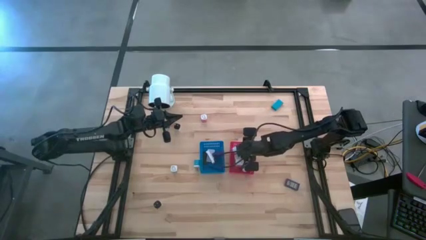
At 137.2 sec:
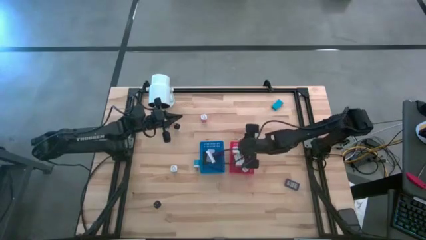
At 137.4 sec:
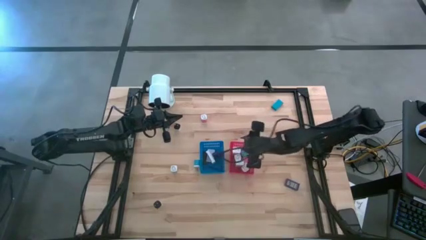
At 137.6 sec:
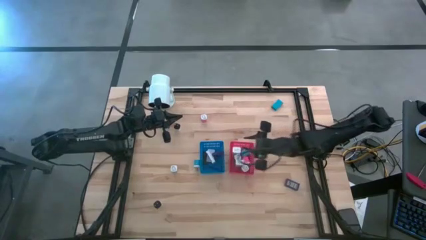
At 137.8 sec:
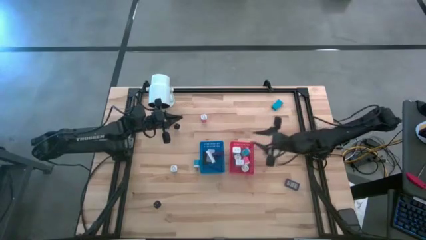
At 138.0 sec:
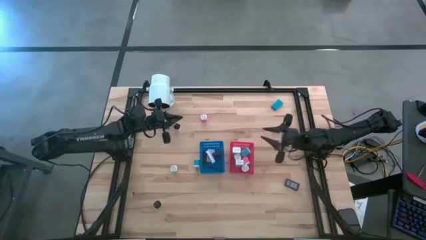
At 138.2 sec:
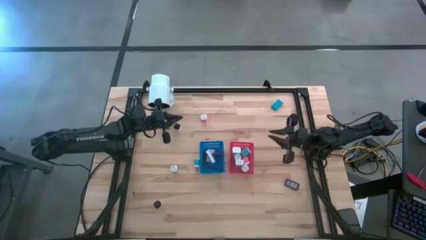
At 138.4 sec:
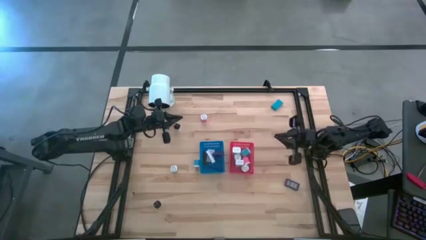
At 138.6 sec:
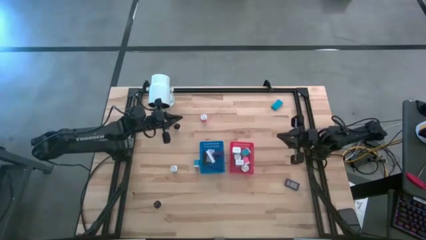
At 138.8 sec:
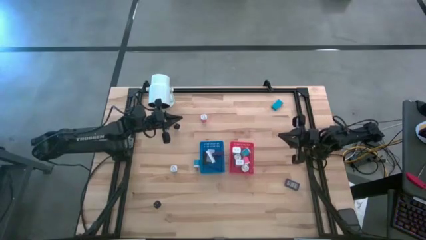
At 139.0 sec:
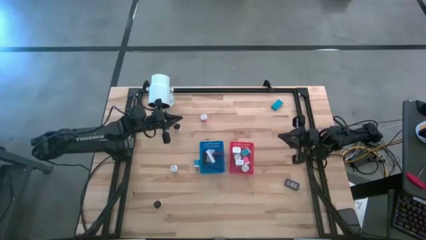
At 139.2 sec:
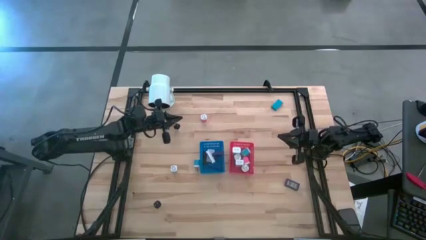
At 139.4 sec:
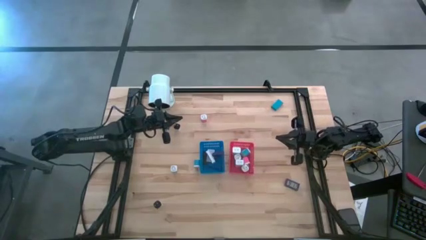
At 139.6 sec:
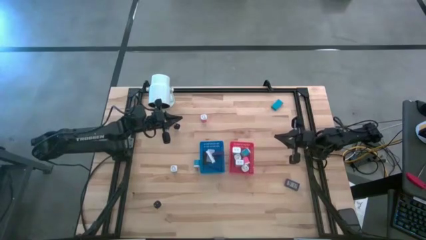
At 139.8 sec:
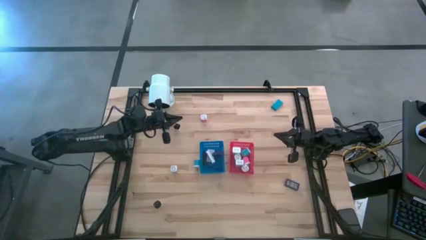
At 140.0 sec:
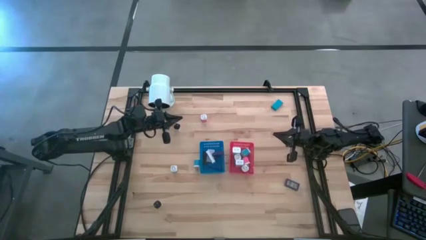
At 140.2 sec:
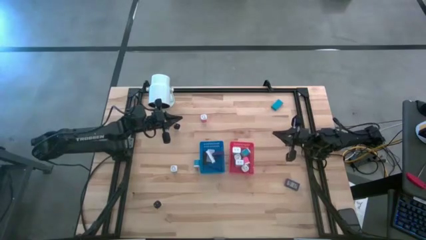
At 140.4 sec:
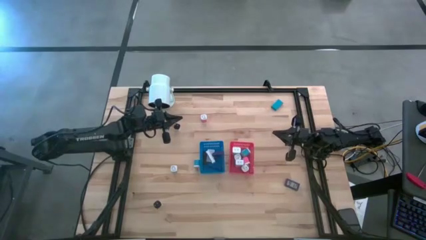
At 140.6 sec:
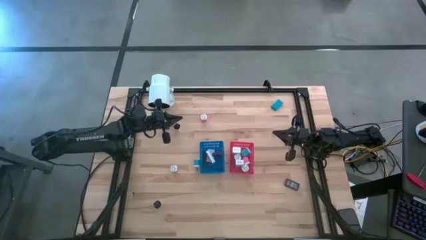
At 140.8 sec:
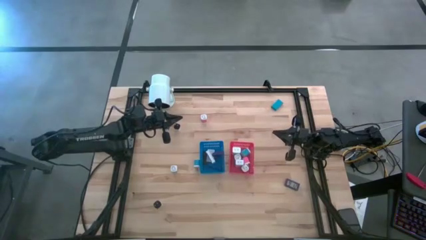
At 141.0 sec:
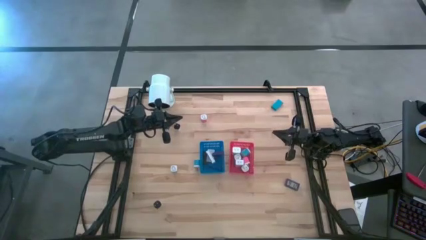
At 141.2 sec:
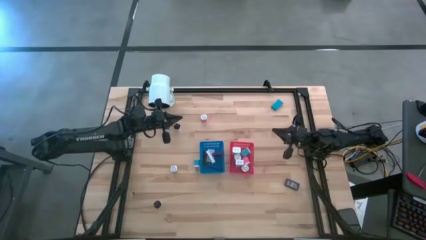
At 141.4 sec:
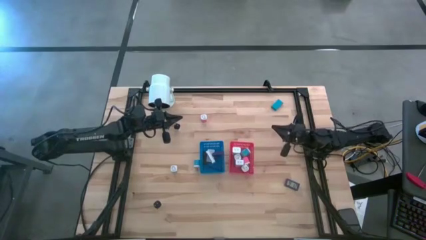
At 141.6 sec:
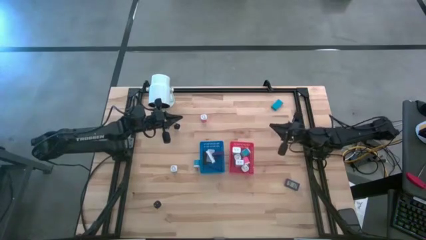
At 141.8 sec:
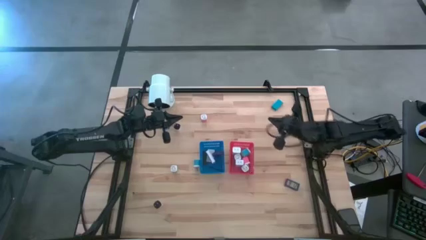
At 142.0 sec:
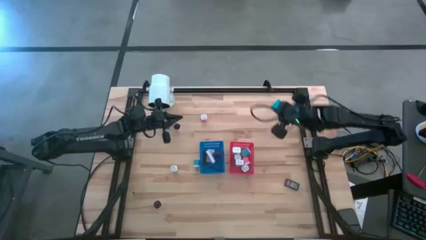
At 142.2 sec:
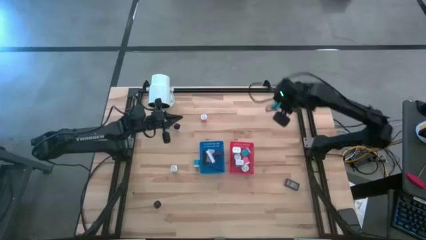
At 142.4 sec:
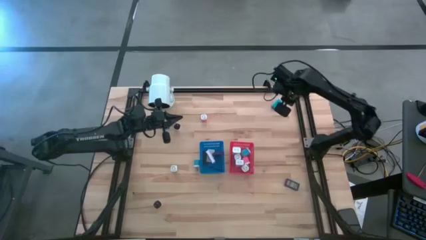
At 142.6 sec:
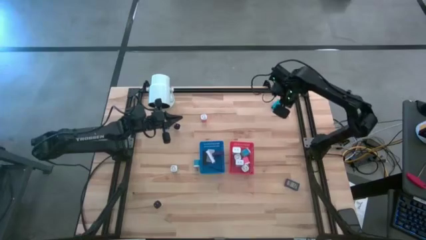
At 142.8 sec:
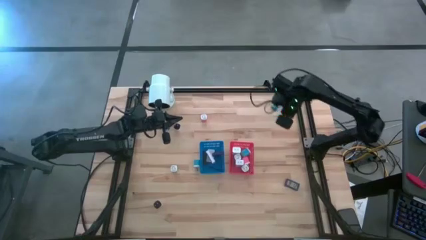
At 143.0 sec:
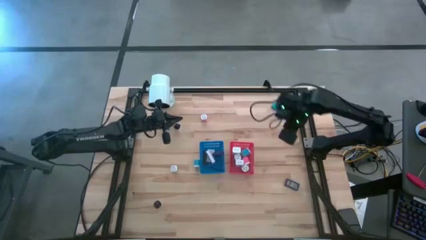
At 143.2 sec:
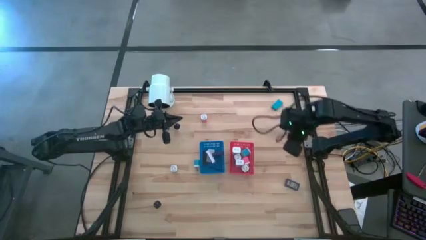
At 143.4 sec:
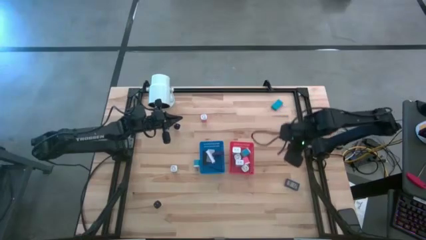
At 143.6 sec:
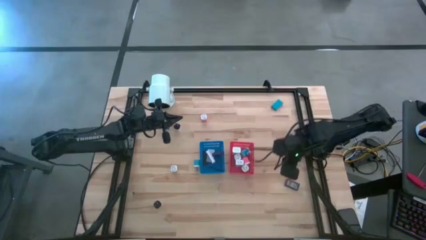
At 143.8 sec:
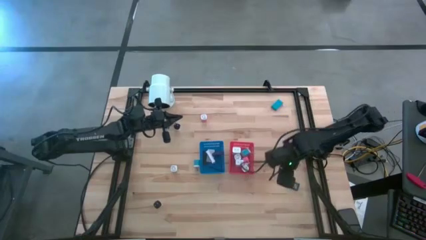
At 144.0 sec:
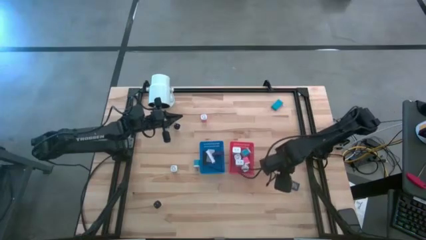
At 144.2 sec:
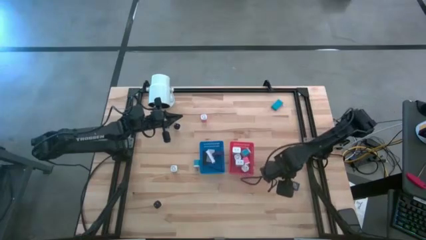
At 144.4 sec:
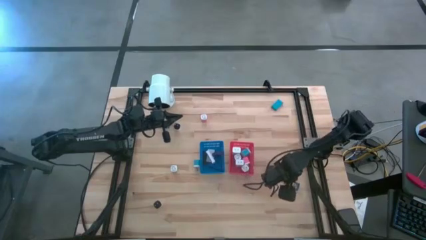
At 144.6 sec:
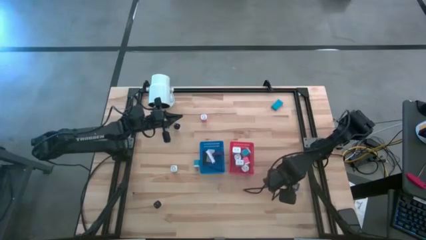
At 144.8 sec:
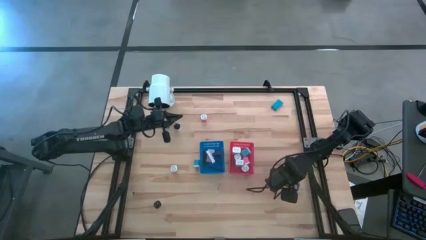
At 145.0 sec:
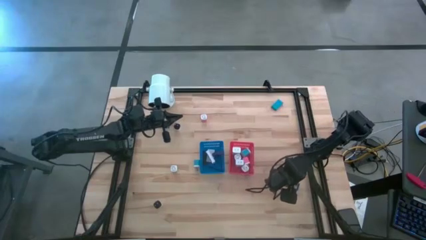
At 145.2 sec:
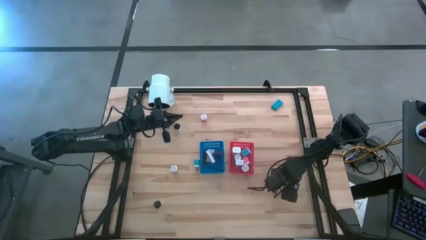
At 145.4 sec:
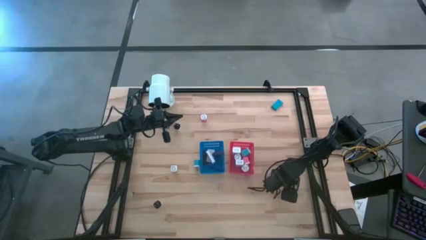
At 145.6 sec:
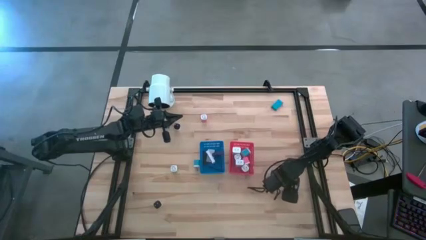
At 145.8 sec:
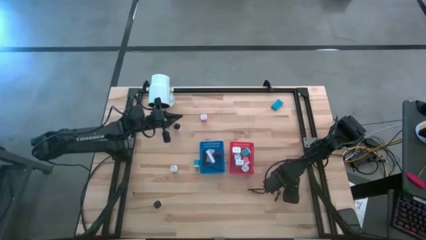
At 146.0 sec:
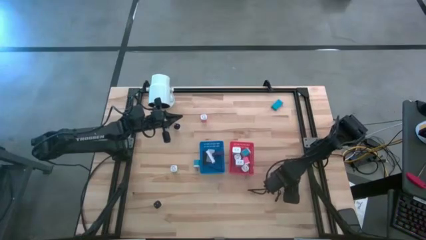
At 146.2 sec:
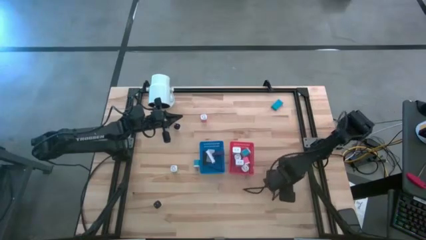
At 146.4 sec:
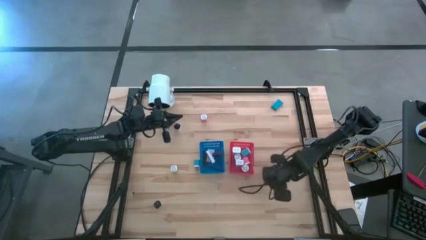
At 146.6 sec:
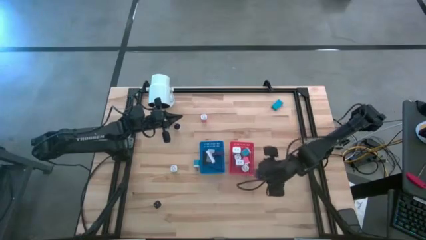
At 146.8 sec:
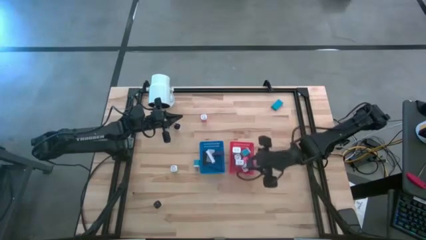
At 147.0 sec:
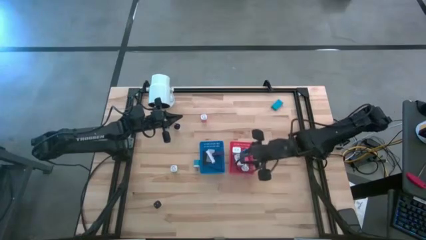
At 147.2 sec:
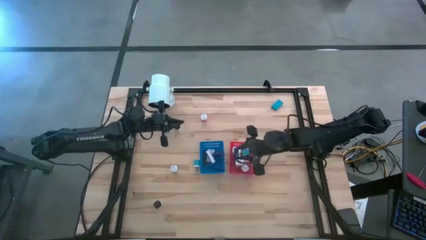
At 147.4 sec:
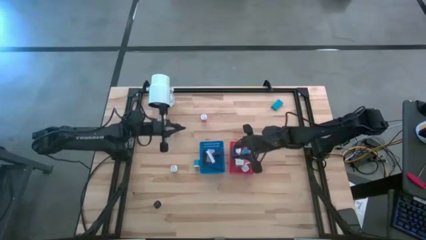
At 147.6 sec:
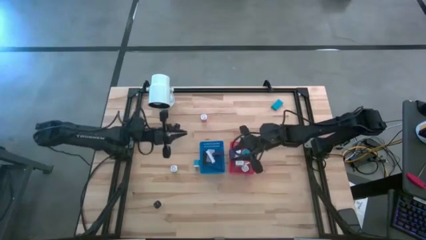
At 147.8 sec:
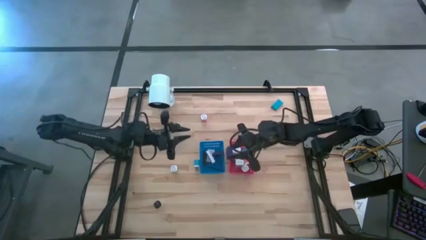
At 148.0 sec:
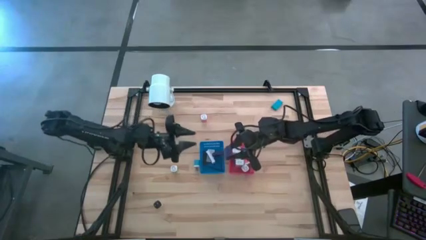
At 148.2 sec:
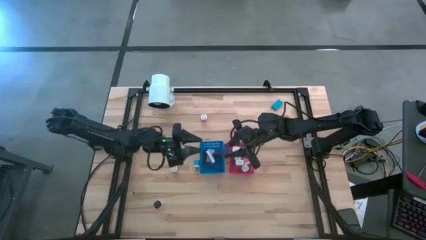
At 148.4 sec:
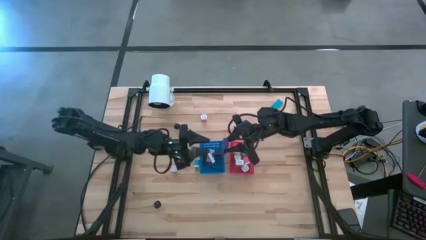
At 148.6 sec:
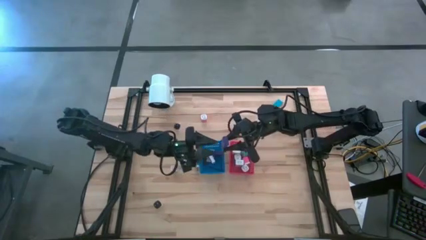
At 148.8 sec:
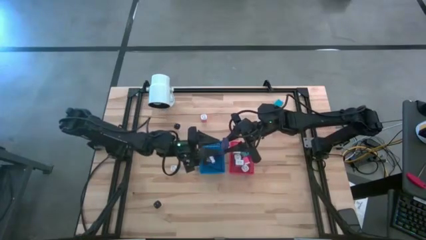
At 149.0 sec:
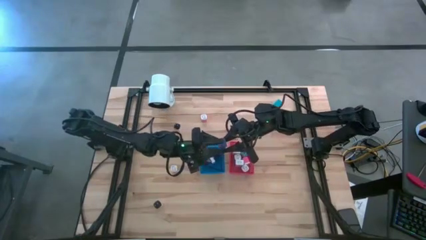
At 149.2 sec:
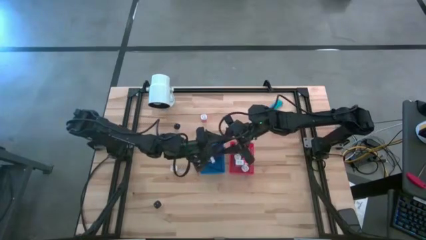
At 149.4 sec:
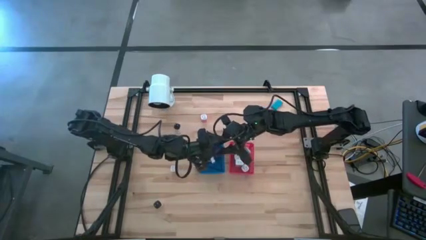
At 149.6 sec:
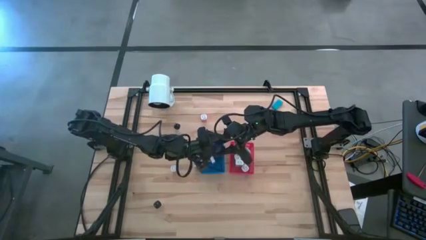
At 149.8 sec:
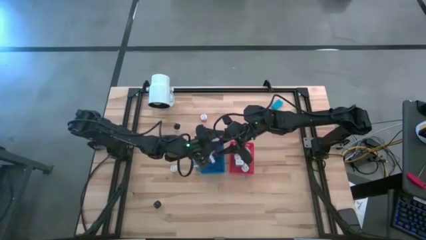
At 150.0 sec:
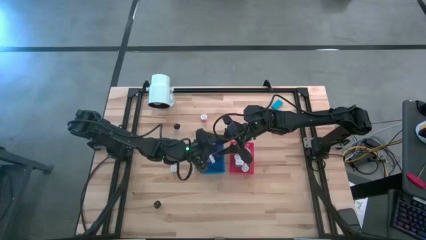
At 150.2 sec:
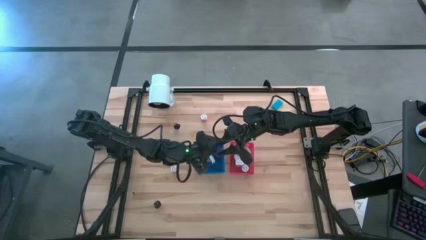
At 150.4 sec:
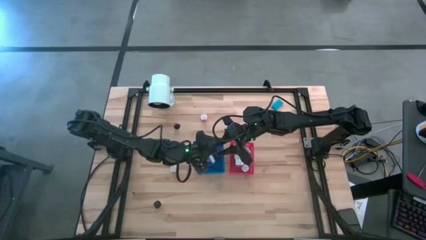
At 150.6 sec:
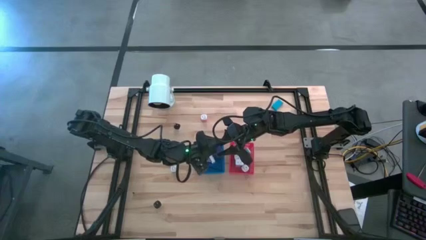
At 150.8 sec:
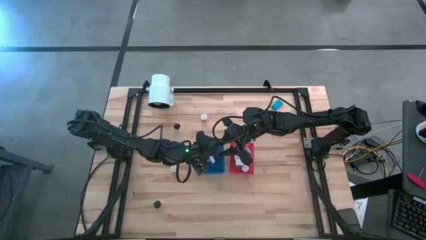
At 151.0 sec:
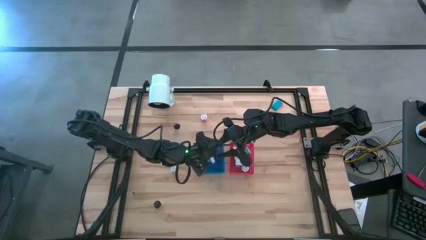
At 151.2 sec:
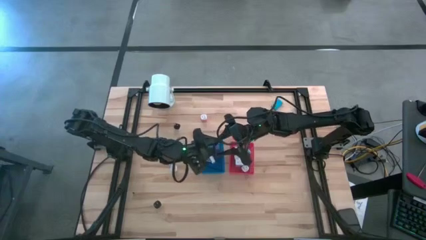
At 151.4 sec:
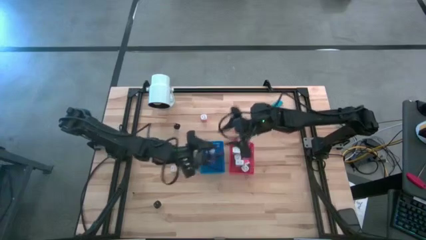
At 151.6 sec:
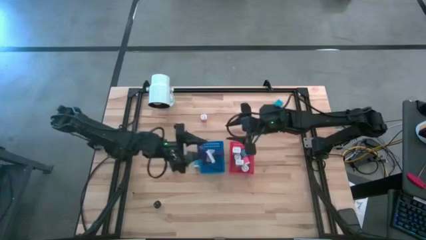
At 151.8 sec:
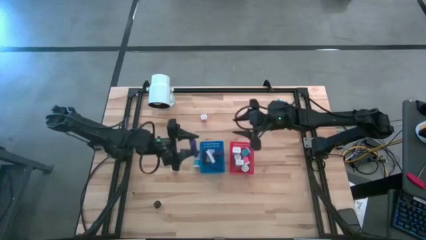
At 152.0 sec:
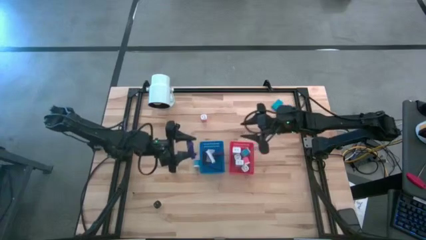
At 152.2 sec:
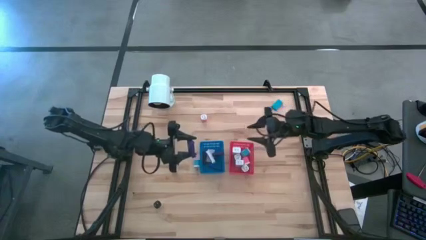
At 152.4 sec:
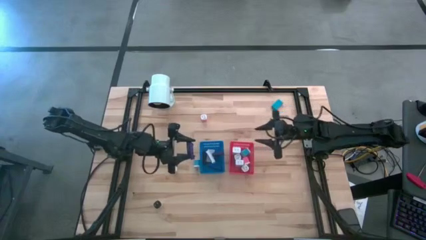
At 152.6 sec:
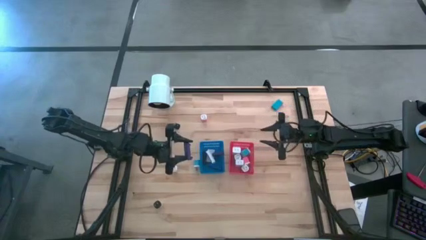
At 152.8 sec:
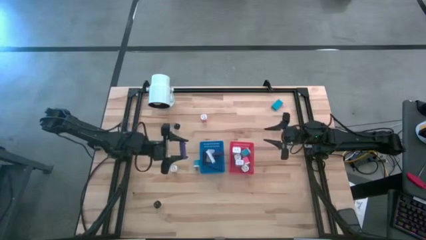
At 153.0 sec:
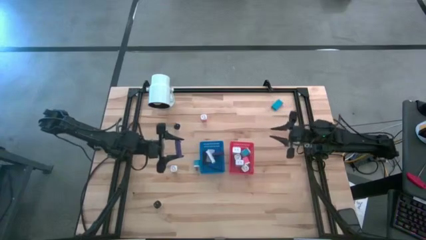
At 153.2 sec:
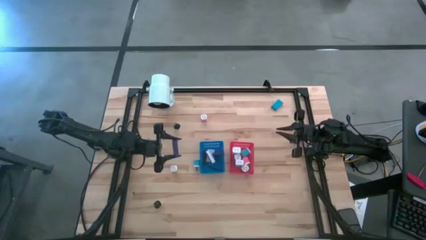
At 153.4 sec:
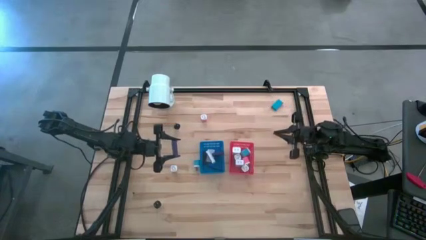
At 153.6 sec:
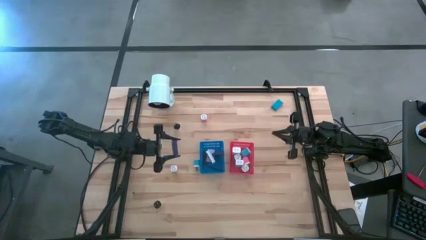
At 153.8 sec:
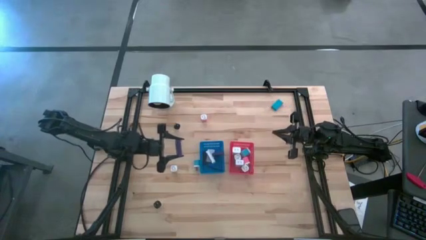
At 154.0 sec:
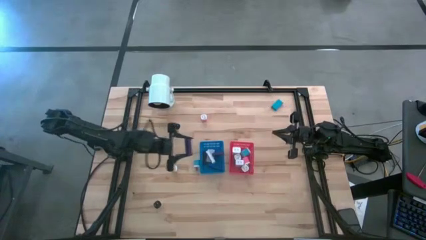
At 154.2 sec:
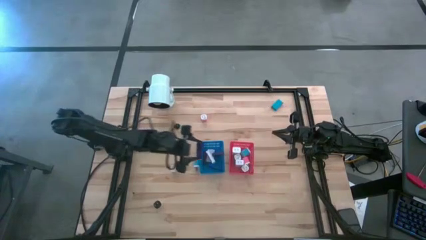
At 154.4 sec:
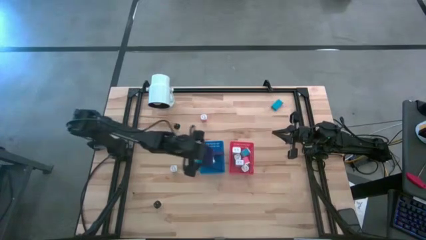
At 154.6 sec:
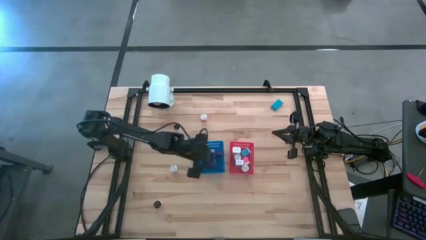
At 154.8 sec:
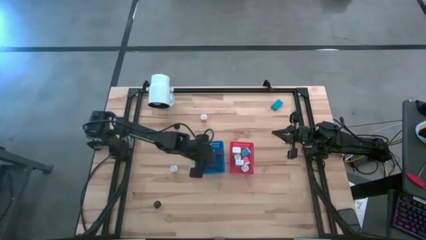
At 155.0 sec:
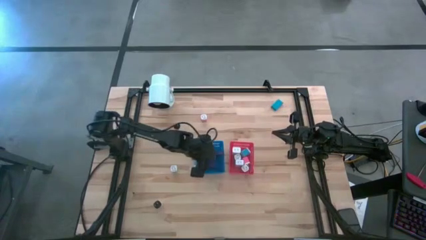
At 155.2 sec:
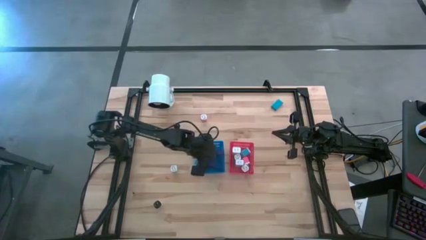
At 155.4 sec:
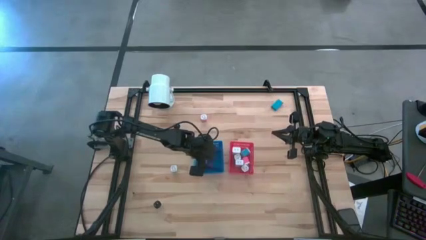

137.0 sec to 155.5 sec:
Task: Sort adapters and digital timers
Put the purple timer into the blue bin
